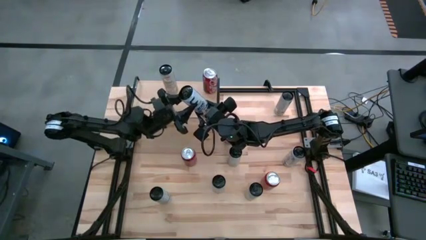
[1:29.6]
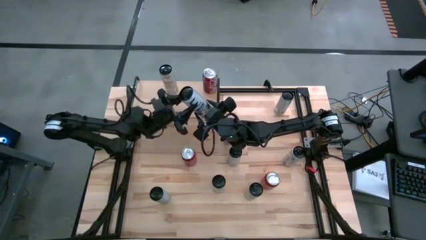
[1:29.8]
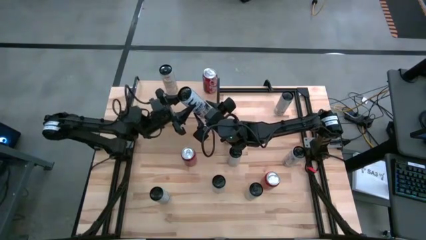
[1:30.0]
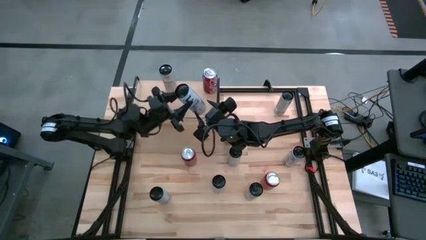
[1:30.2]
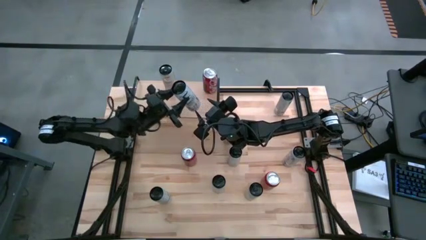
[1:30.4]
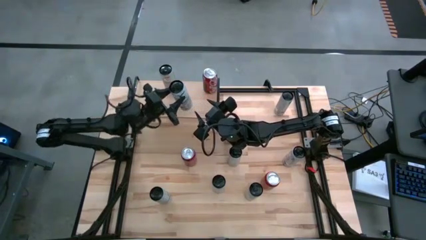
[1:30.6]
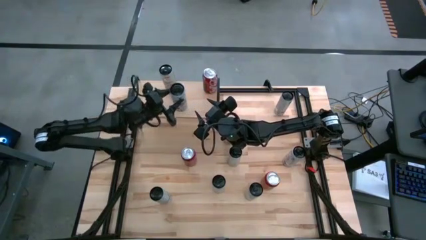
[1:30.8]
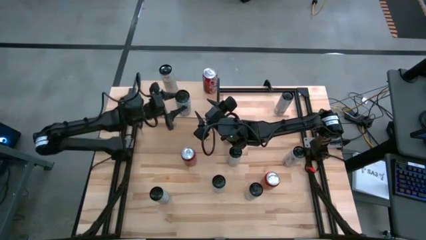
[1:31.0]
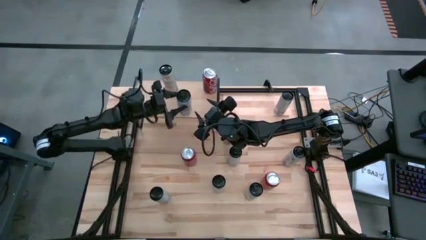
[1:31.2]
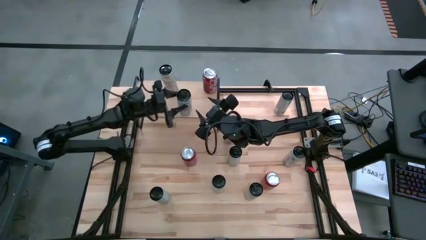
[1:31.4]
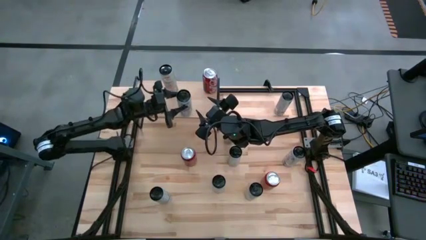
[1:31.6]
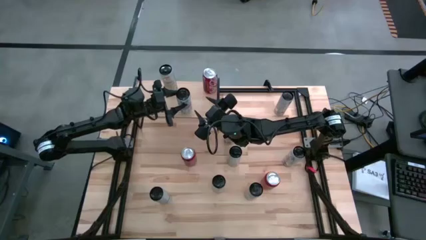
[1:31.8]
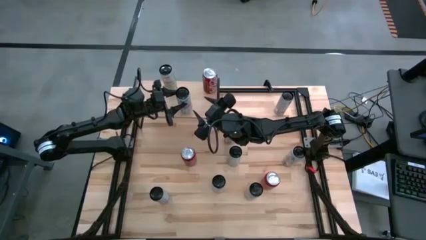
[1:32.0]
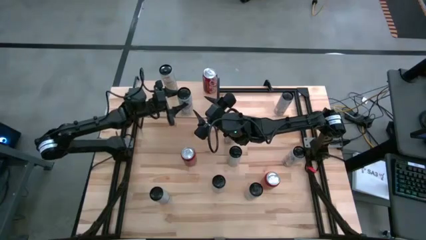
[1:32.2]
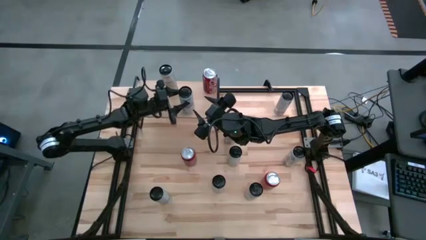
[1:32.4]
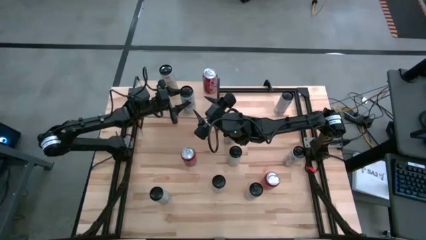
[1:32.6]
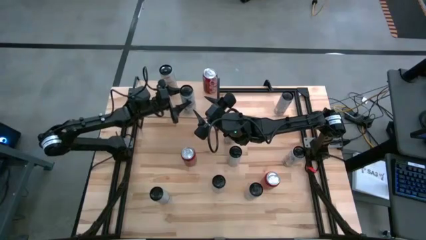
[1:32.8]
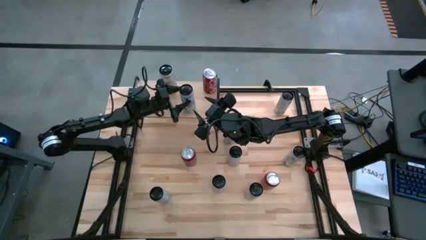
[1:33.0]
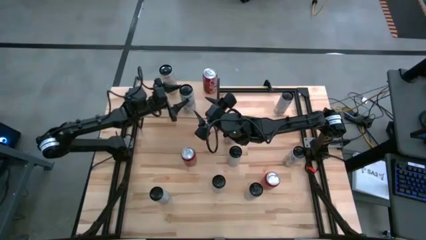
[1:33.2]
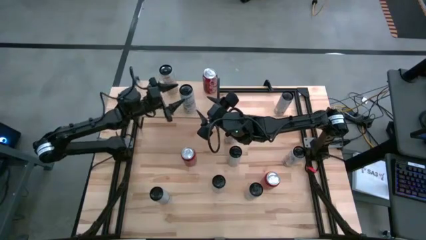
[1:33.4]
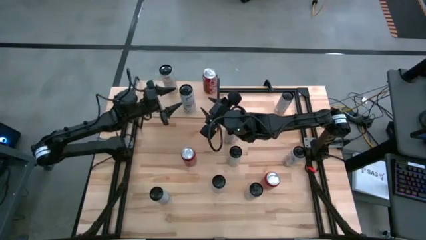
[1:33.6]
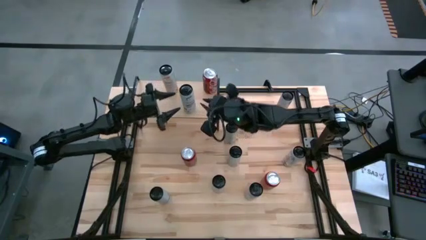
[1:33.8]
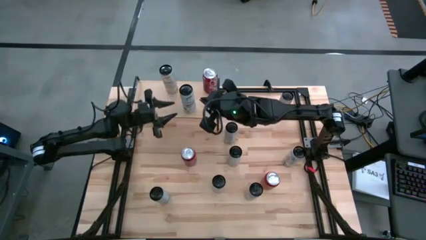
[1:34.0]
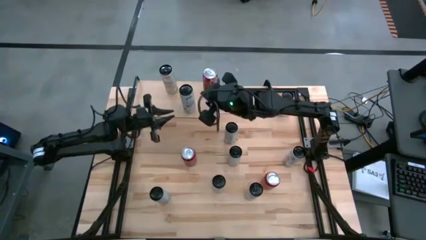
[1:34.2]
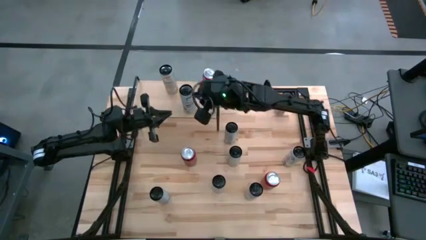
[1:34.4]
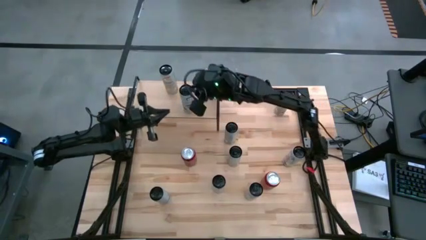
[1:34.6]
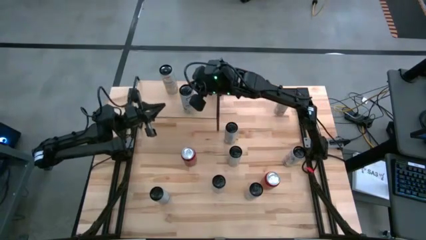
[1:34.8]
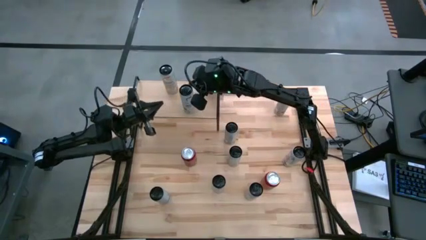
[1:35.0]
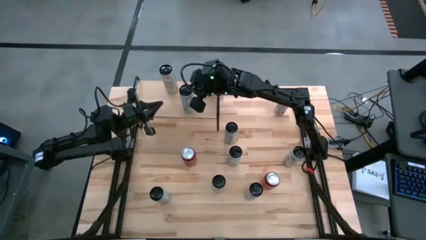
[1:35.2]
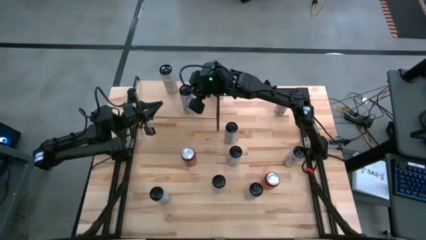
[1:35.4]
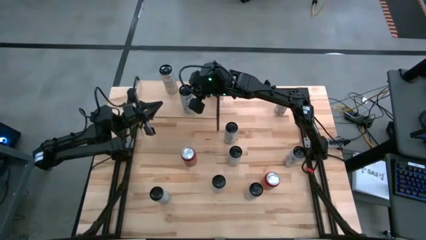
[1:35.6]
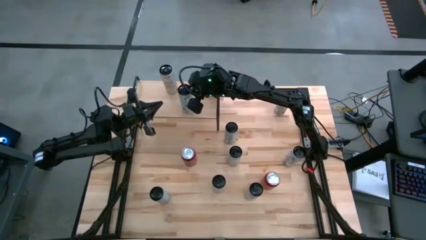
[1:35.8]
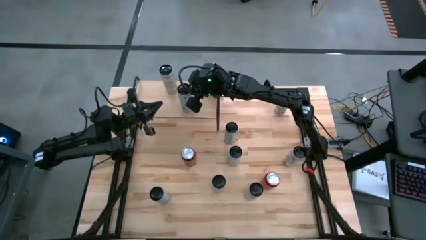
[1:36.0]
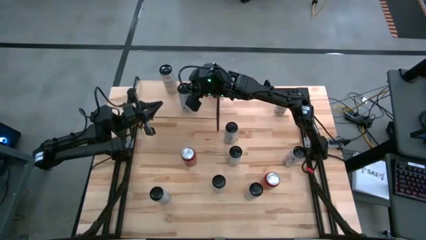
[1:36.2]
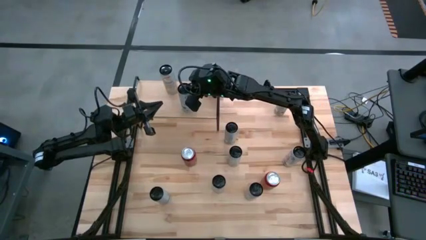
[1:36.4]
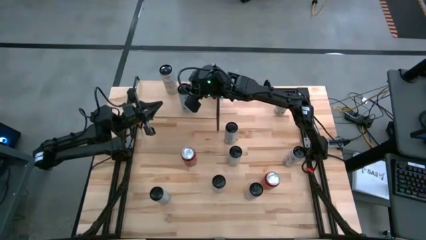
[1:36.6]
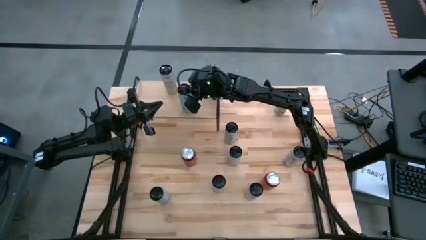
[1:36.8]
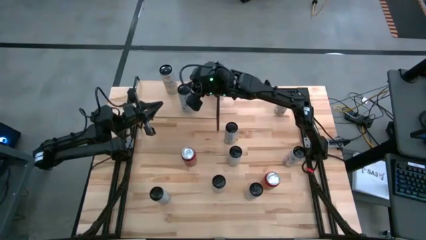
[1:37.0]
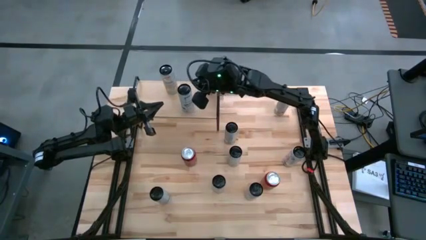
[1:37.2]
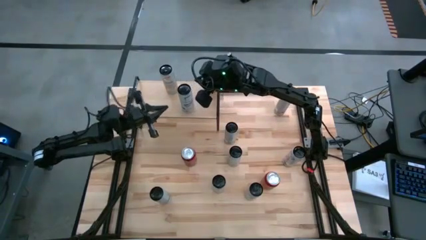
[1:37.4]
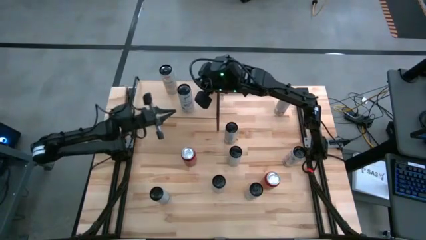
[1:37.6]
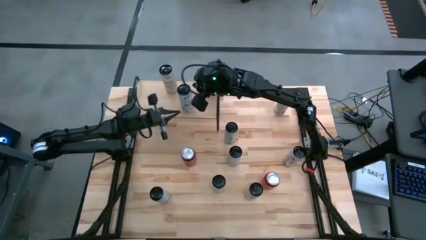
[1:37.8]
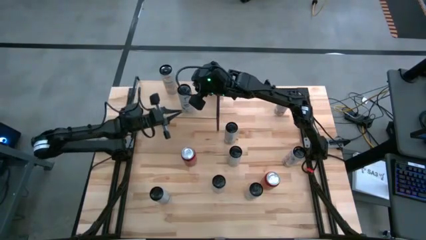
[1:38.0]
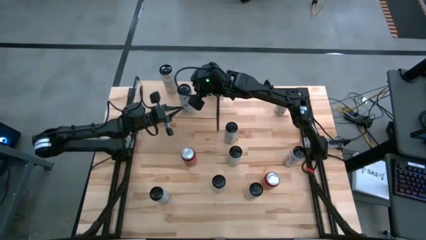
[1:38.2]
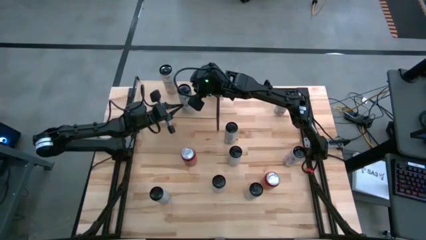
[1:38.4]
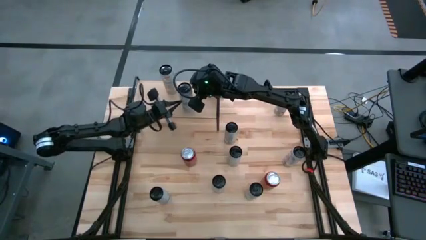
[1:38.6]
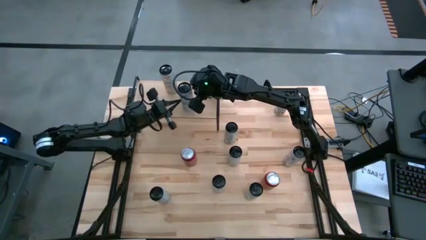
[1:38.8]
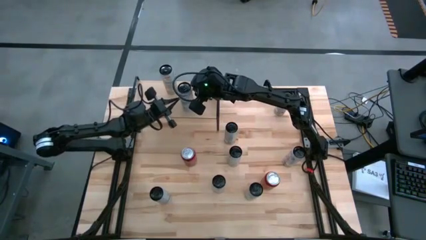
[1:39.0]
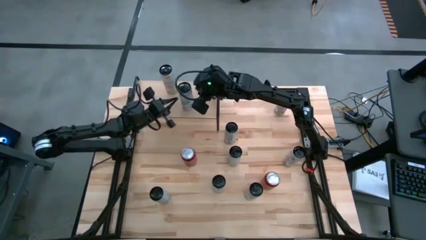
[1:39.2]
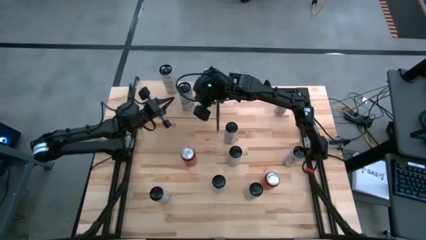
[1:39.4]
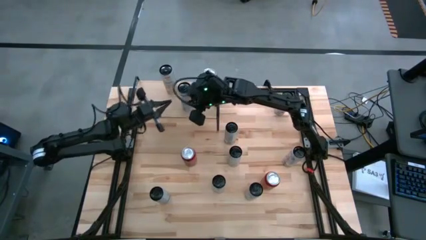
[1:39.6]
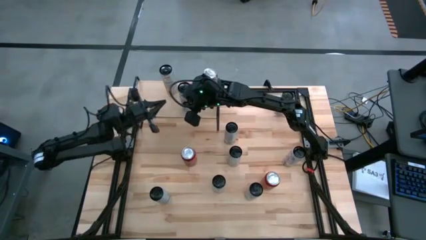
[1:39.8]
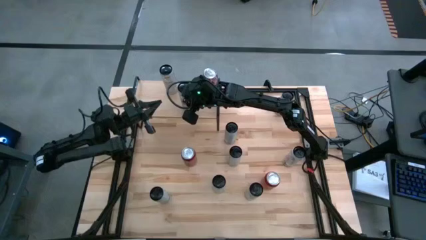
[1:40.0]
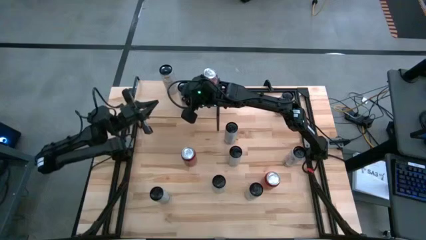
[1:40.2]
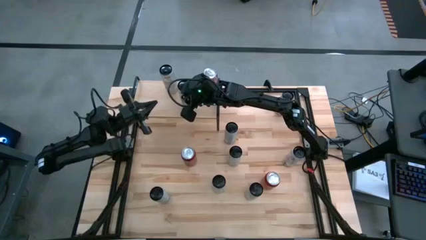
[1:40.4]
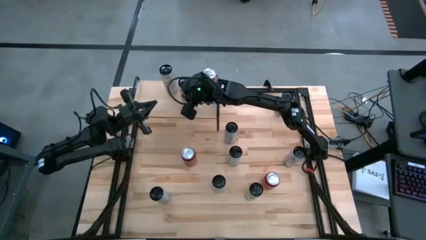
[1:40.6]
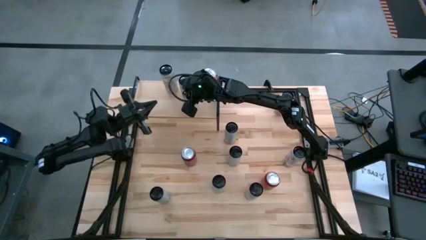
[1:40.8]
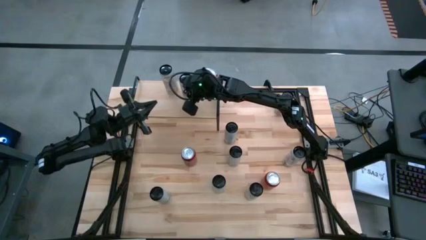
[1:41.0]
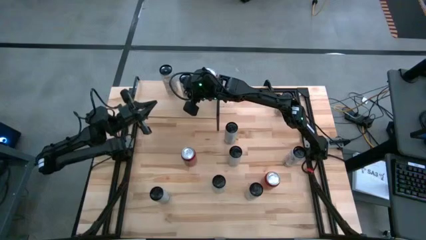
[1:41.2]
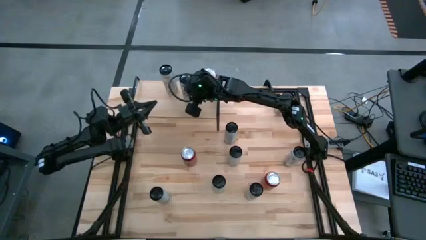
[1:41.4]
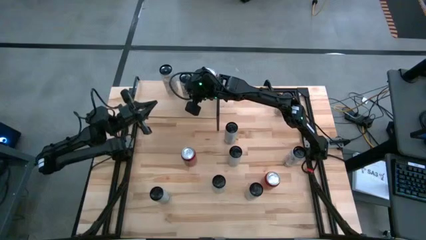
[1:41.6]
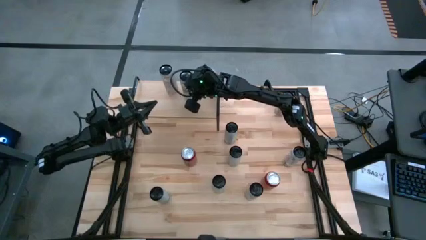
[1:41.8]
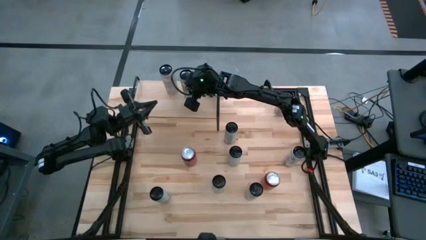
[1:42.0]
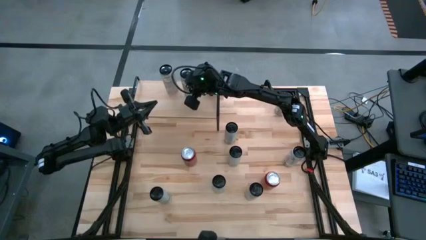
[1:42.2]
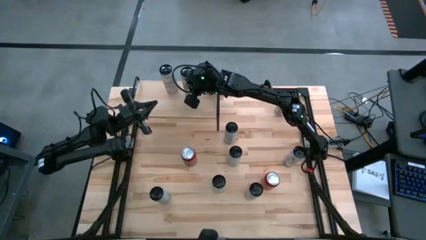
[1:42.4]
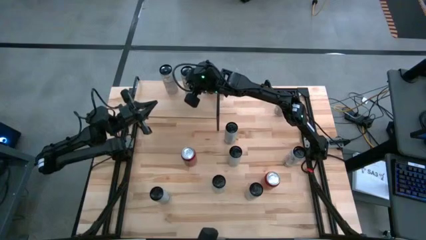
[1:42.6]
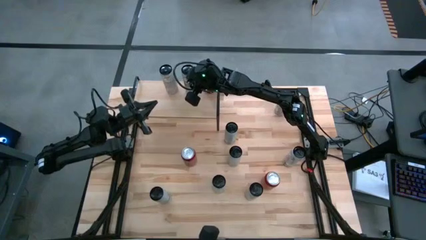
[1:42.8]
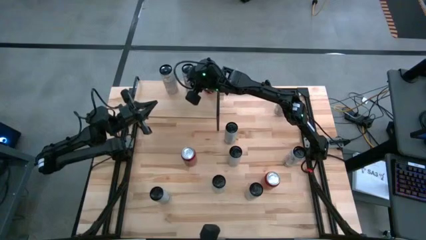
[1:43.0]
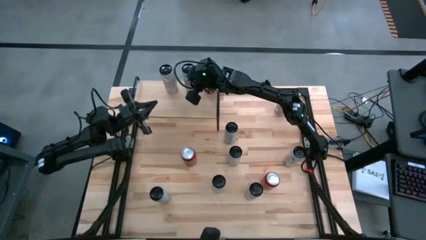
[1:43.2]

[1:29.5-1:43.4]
Task: Place canned beverage on shelf
Put the top left white blue soda can on the shelf

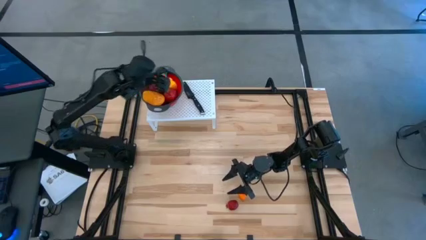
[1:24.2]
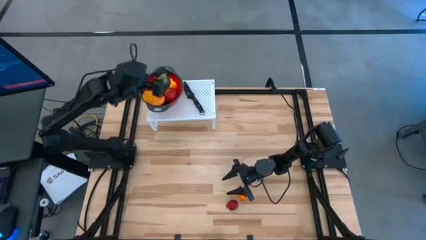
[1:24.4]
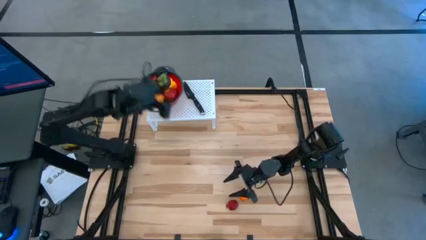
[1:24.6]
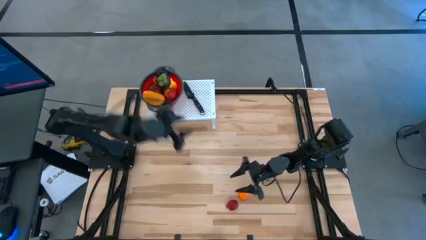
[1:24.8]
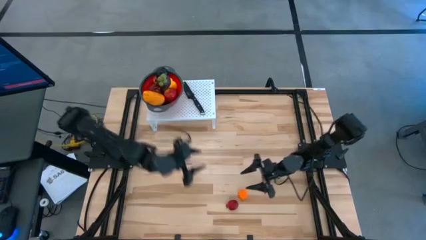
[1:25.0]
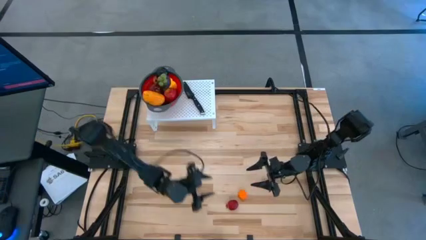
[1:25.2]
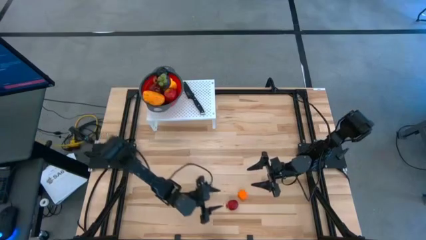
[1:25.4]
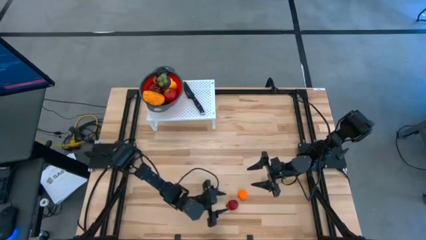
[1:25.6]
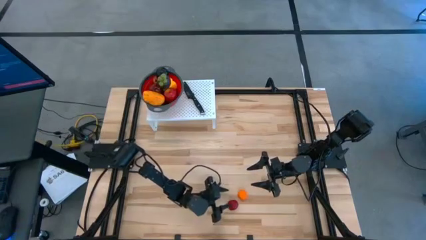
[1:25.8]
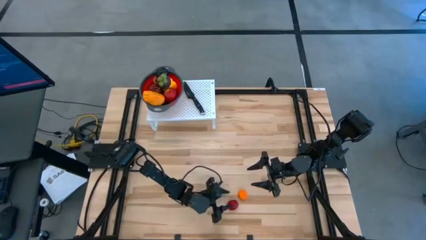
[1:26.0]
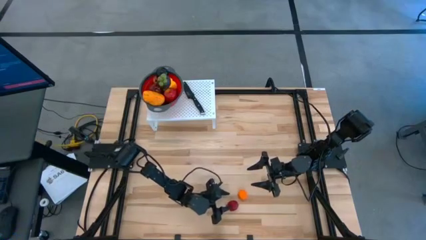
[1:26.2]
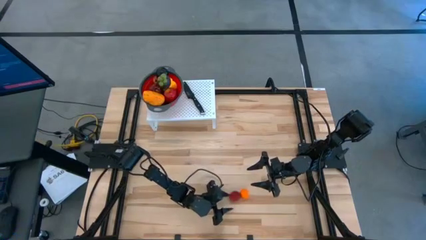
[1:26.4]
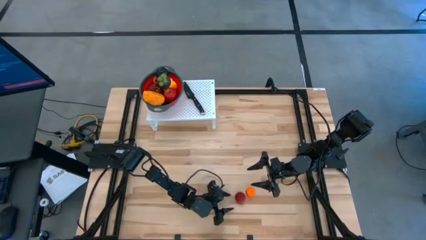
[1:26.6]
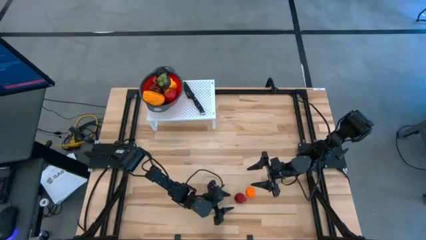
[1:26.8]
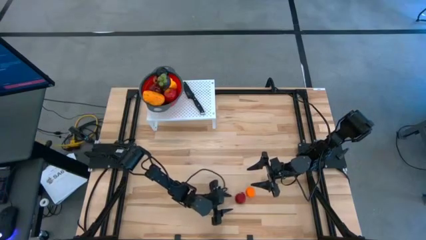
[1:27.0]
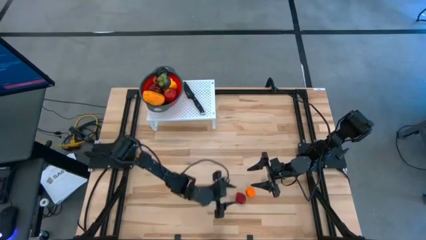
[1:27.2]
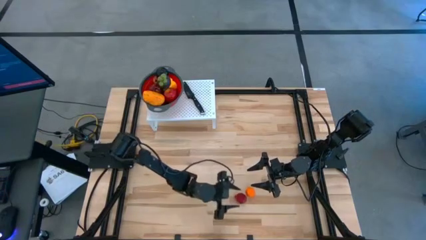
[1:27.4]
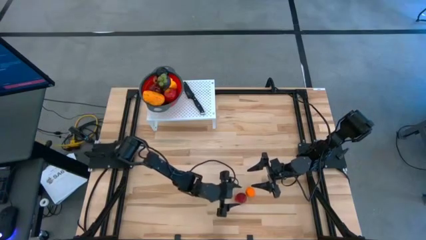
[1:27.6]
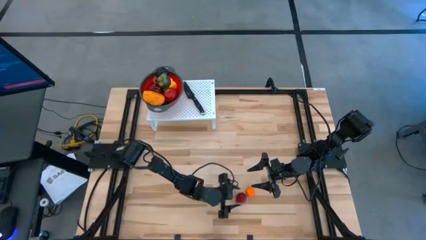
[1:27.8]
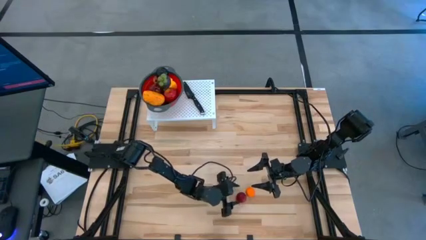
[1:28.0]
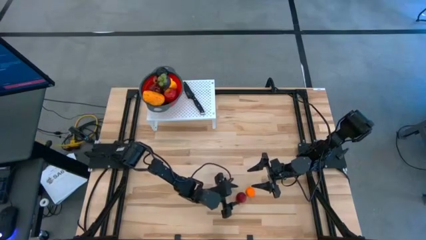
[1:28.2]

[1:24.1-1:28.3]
Task: Pick & Place Fruit
Put the red pomegranate into the red strainer bowl on the shelf
